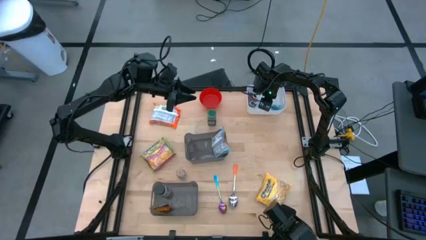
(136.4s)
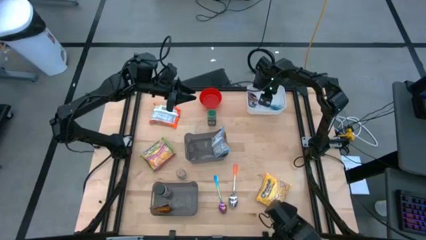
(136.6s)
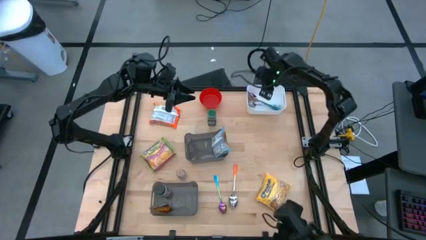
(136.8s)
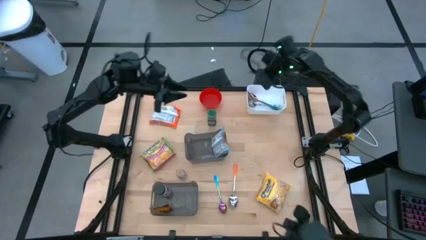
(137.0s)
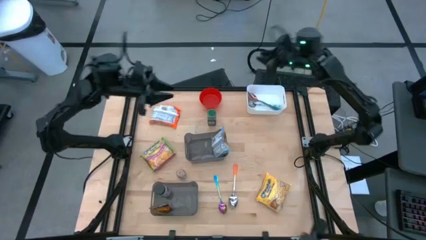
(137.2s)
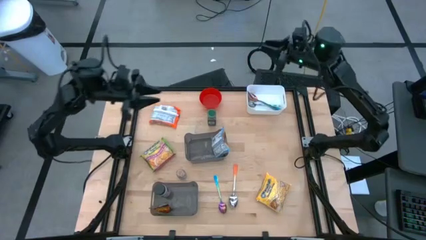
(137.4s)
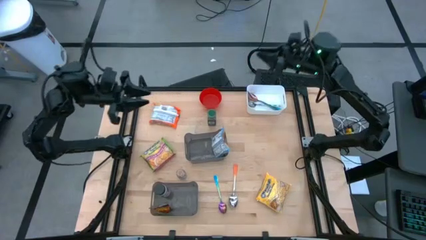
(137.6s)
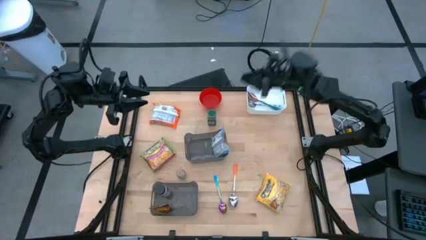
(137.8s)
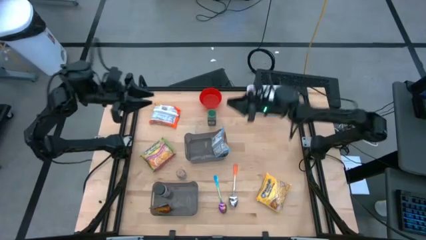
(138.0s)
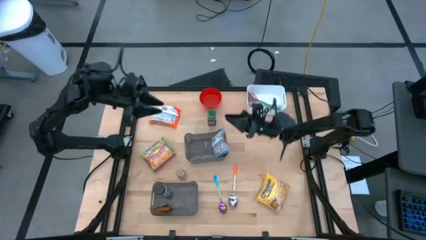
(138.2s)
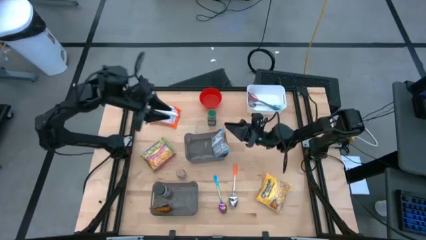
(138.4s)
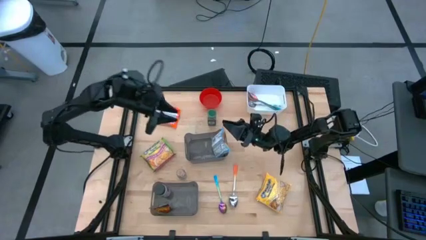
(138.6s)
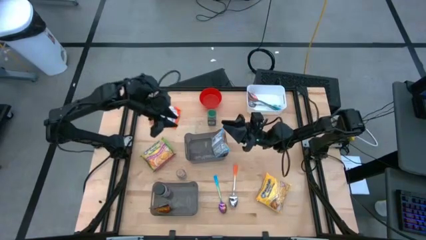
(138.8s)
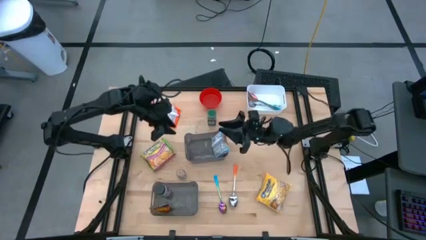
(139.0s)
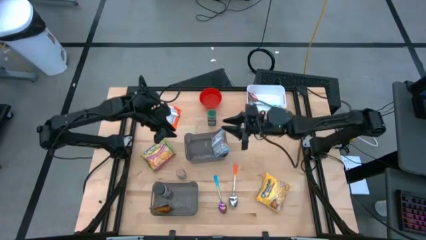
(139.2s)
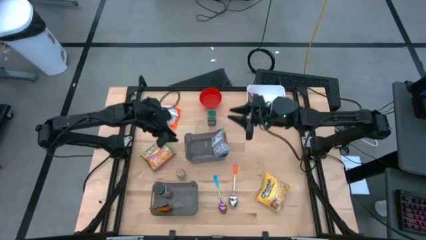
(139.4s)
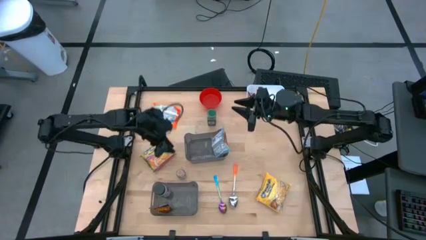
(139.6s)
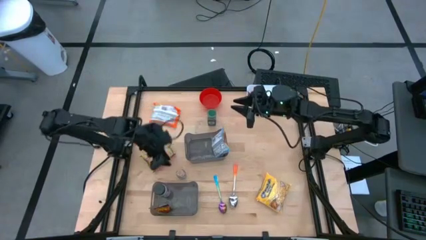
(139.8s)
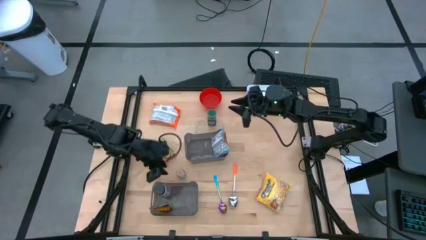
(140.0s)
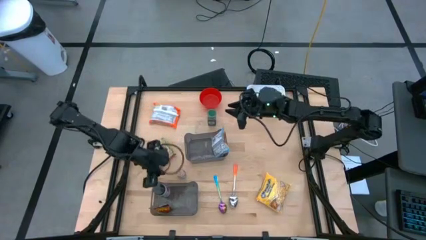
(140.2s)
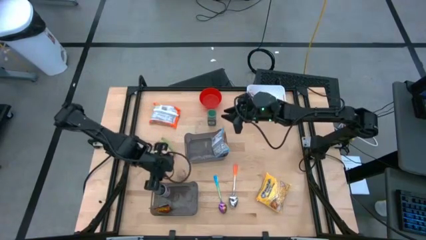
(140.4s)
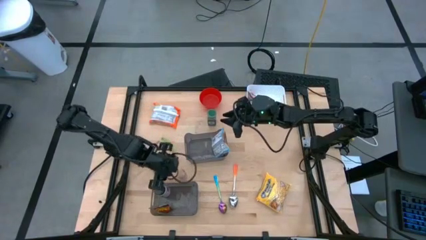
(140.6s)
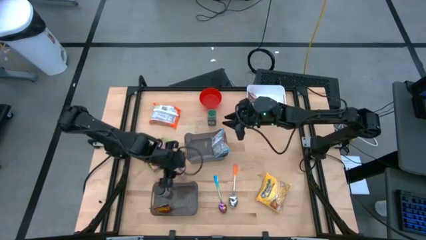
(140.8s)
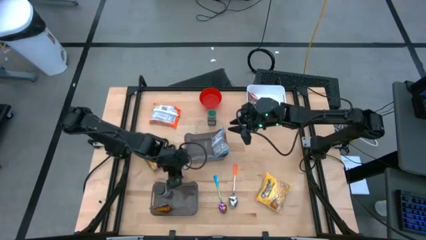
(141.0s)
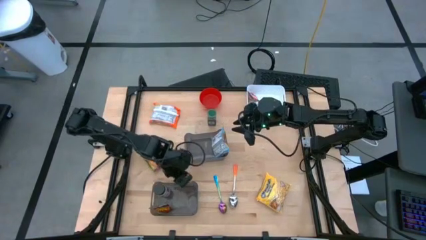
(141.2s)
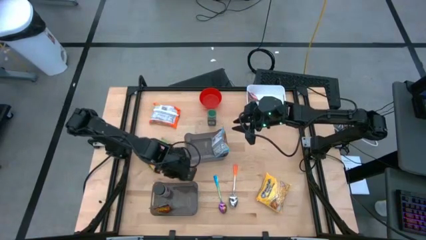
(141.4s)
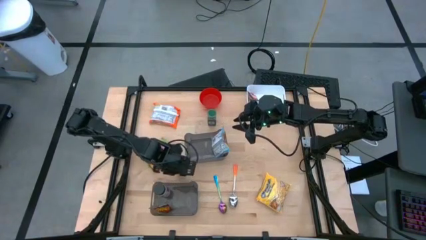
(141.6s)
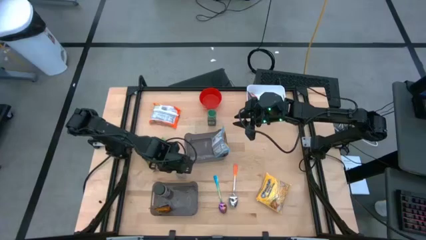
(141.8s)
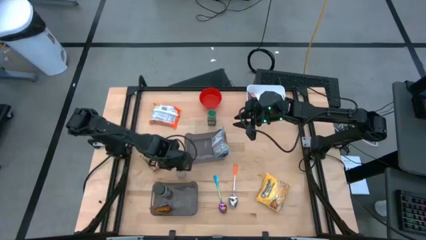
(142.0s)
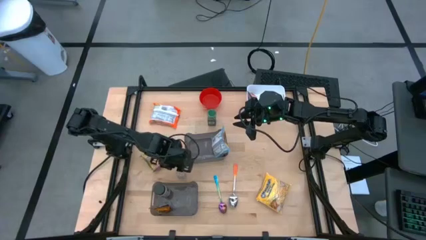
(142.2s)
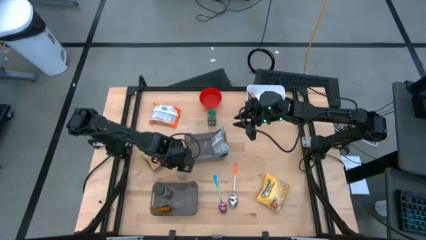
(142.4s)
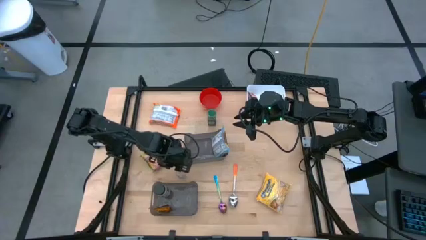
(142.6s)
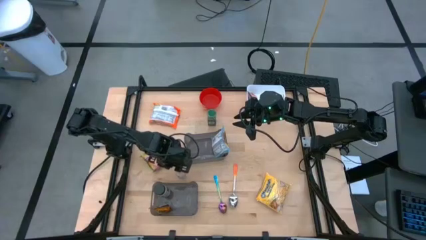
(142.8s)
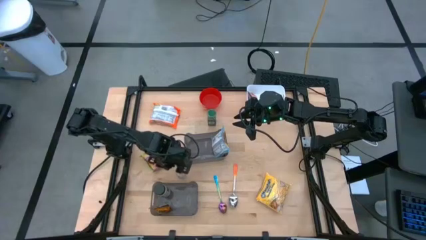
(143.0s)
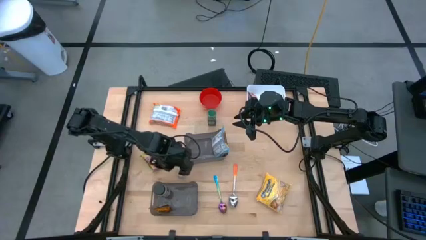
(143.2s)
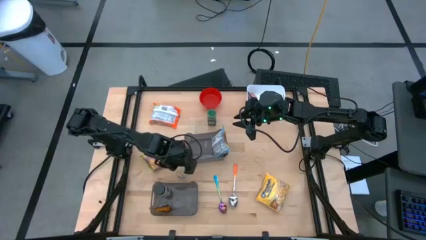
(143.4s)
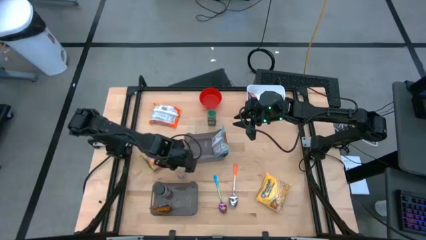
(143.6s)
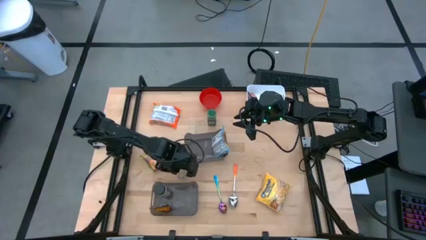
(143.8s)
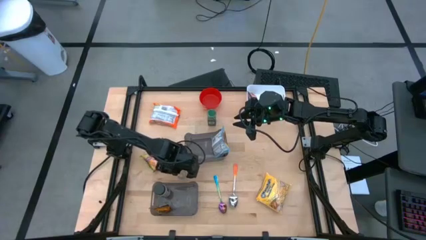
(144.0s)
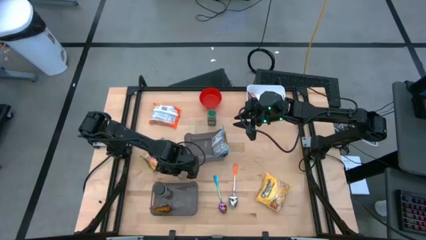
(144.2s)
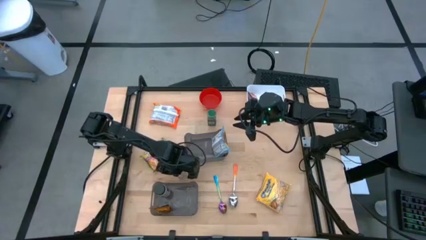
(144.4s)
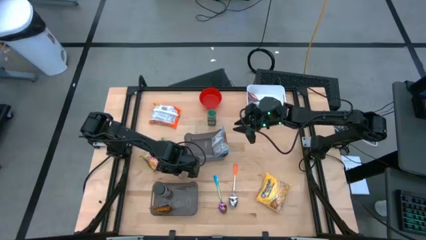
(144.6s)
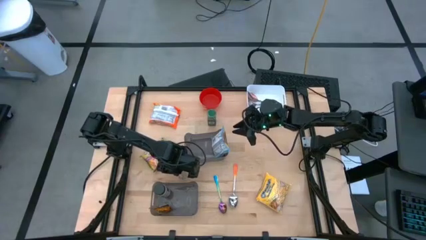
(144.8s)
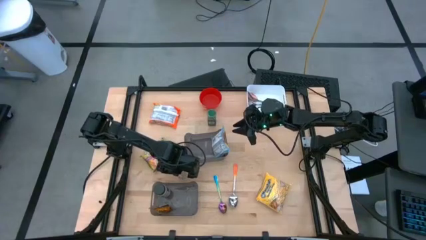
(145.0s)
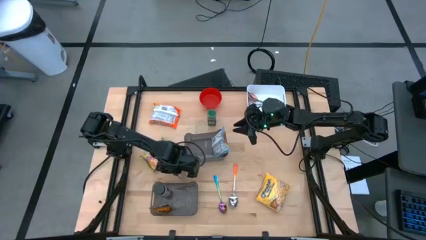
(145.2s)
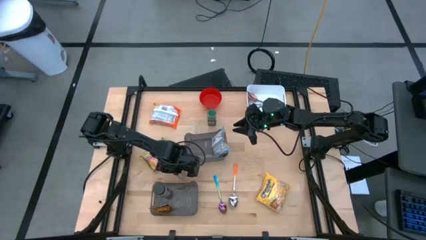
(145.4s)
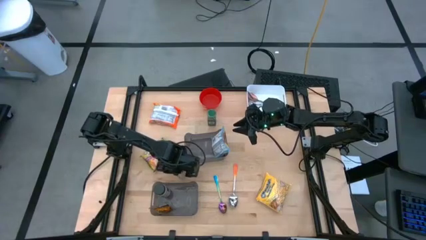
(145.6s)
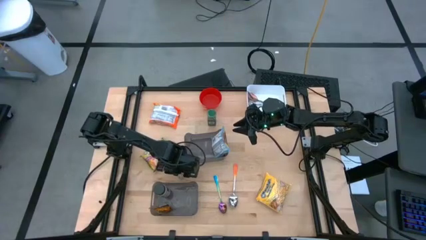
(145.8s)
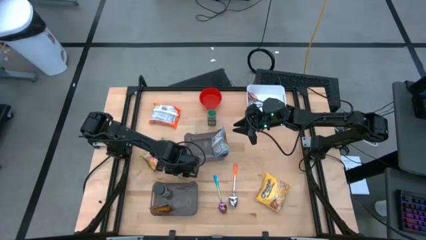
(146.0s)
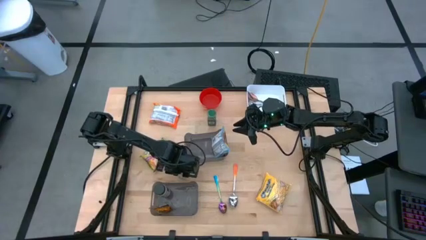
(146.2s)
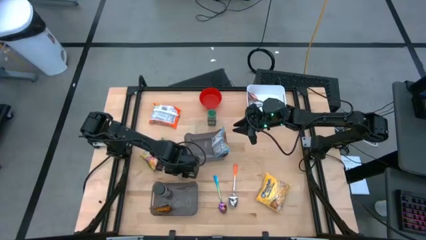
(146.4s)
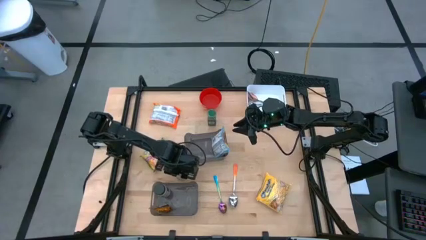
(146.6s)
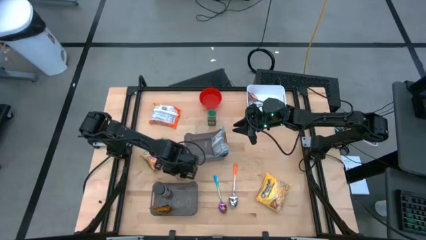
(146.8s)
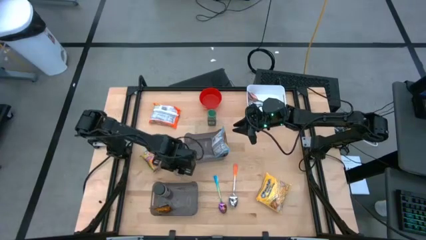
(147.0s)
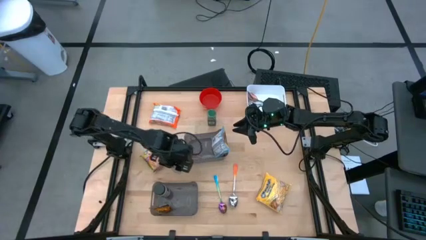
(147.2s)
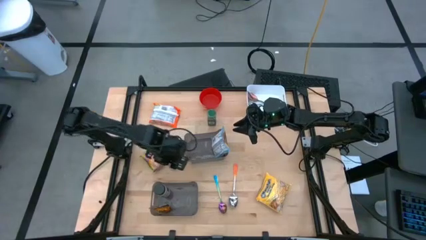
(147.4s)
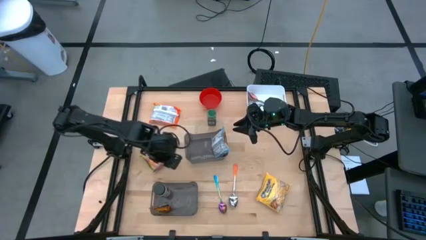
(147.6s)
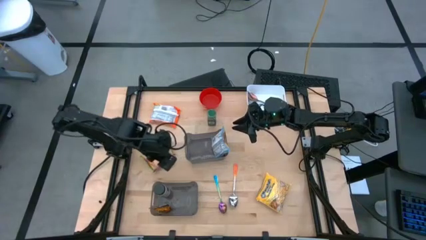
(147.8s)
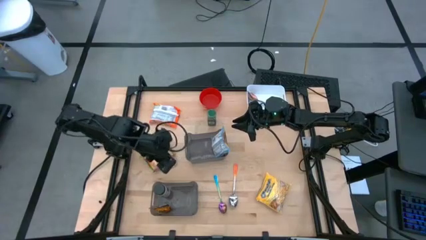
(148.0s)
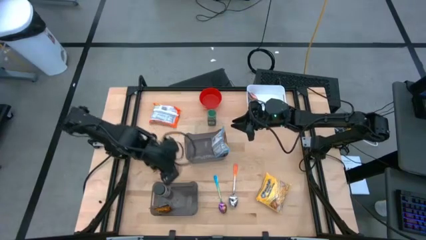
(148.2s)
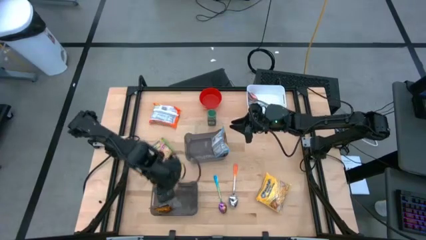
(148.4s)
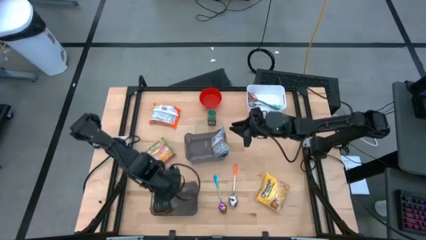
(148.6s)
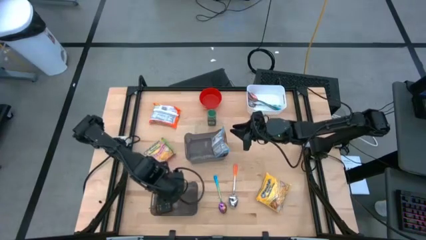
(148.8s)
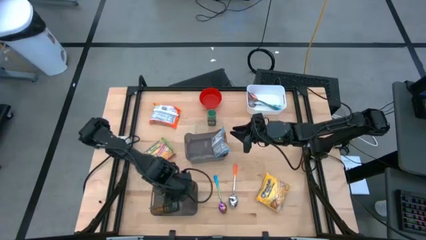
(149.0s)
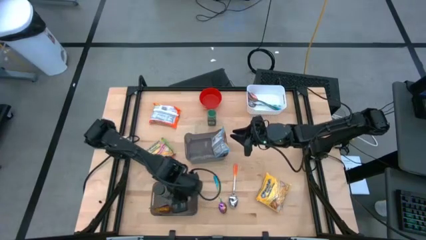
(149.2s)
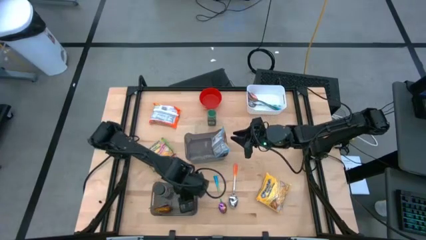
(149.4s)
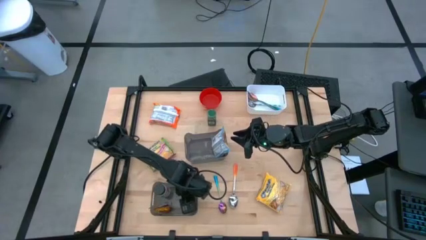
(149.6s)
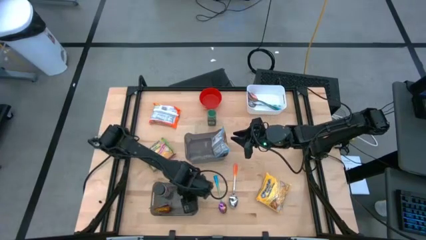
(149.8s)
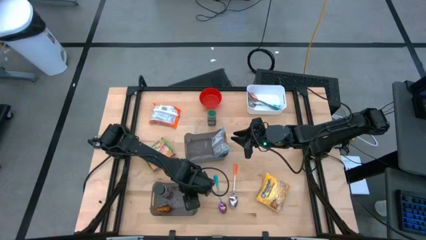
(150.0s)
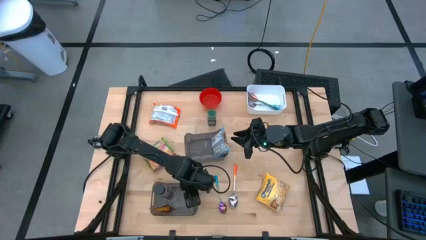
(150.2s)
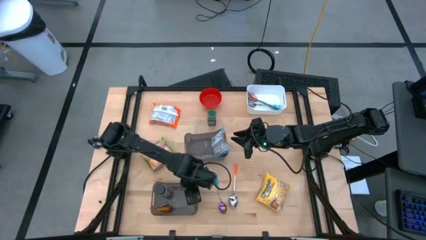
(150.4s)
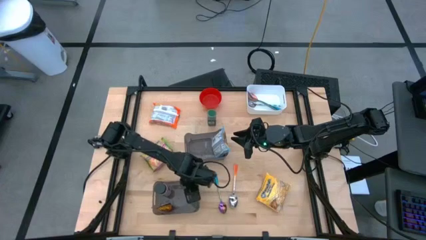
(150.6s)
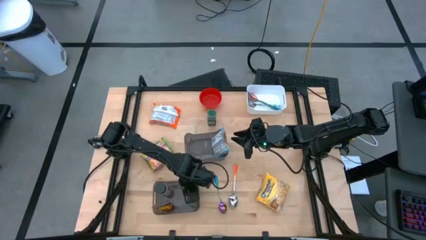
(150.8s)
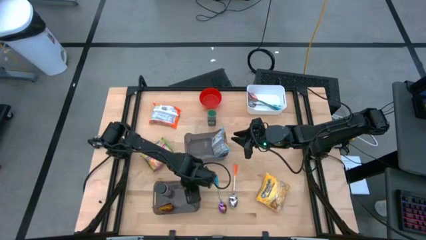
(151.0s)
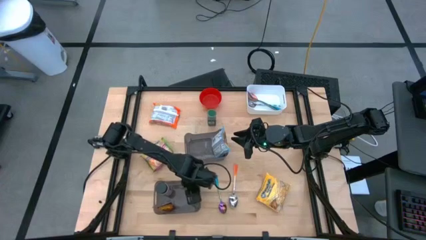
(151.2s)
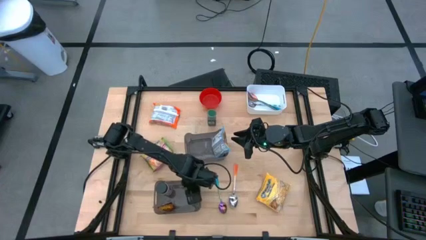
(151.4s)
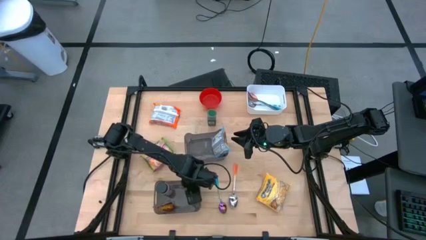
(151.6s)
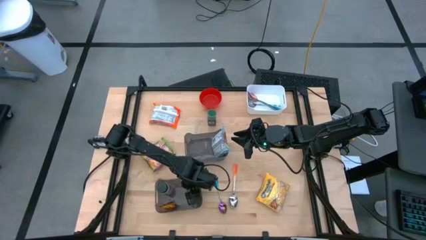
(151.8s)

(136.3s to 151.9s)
Task: Pick & Place Food Item
Put the brown seasoning bottle into the bottom black bin
